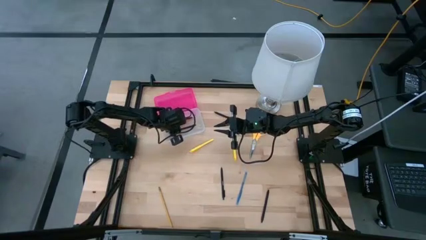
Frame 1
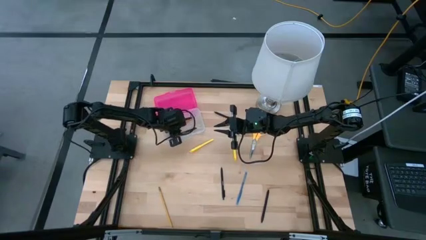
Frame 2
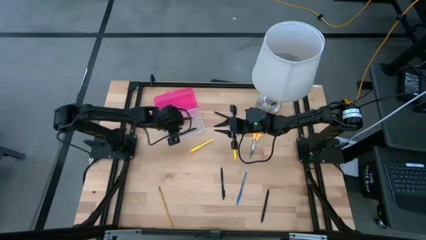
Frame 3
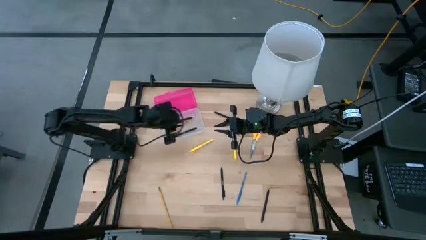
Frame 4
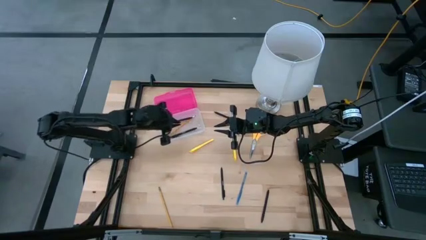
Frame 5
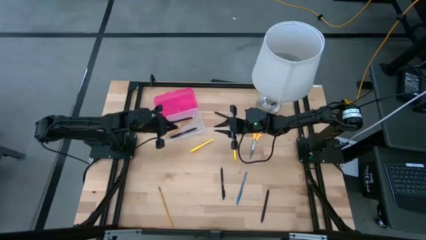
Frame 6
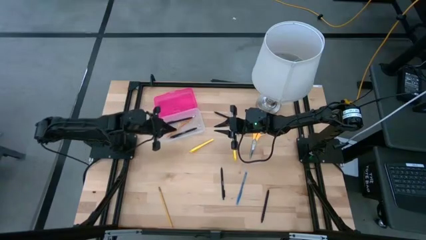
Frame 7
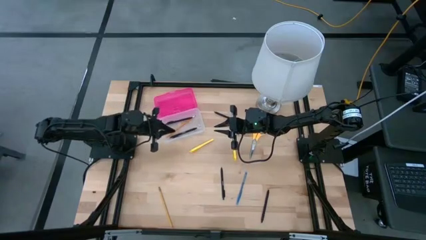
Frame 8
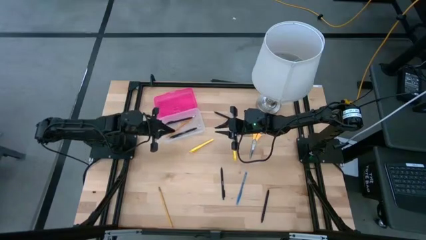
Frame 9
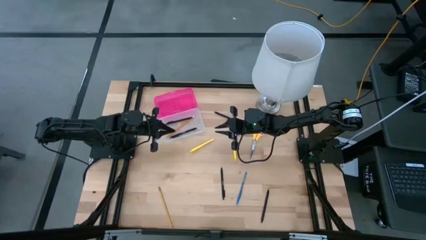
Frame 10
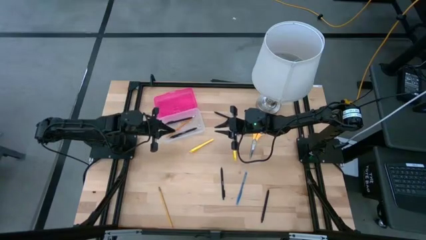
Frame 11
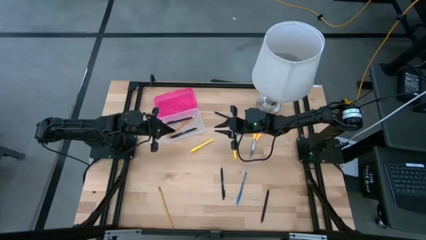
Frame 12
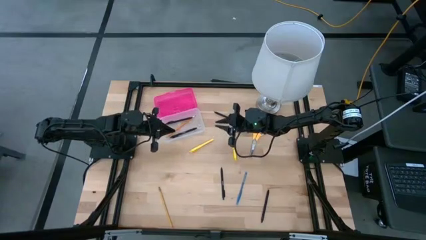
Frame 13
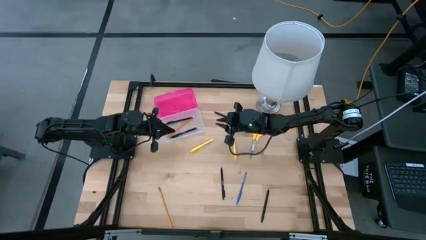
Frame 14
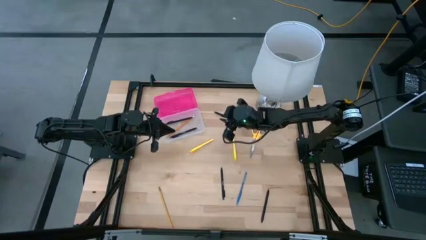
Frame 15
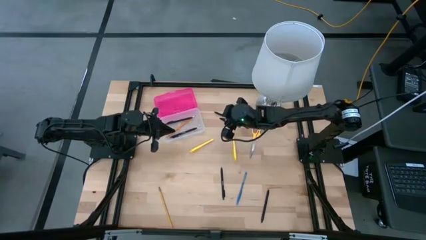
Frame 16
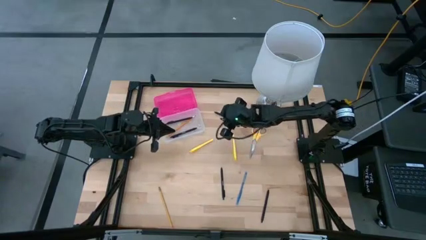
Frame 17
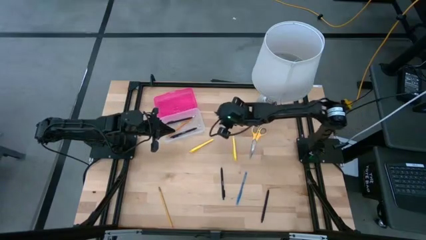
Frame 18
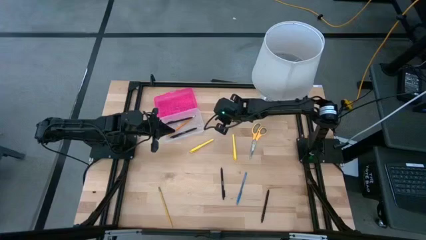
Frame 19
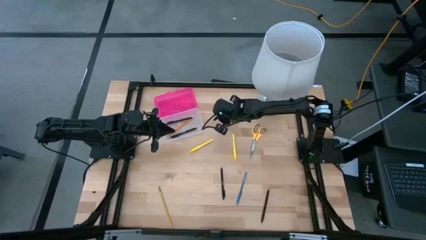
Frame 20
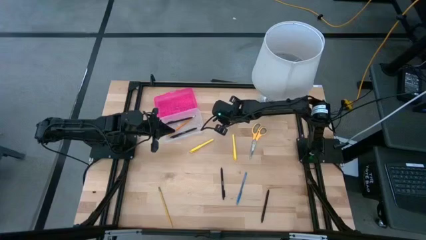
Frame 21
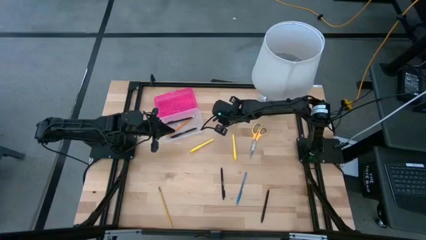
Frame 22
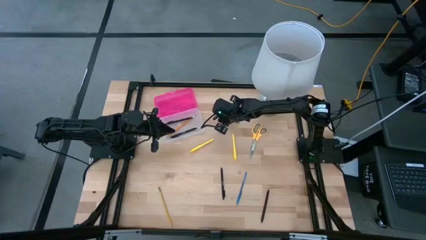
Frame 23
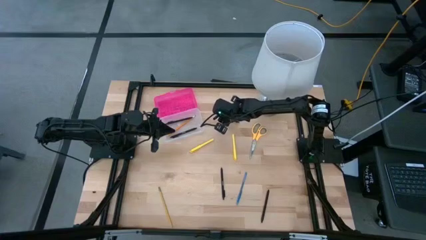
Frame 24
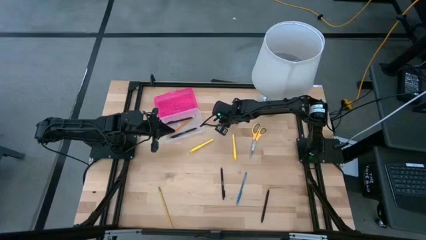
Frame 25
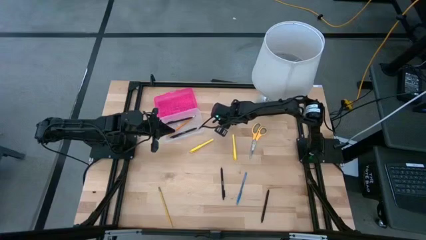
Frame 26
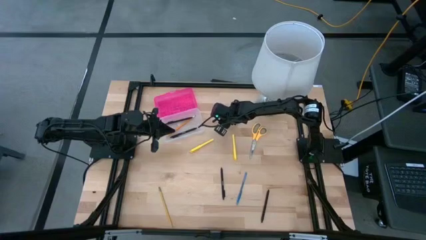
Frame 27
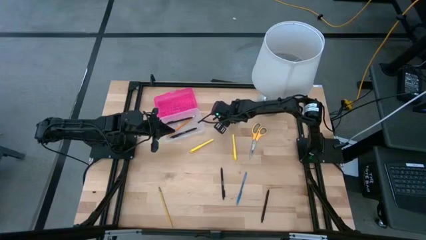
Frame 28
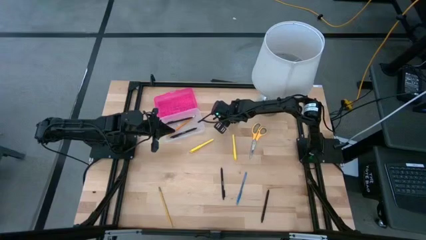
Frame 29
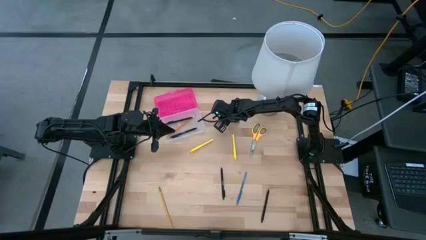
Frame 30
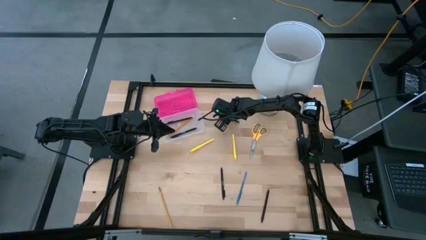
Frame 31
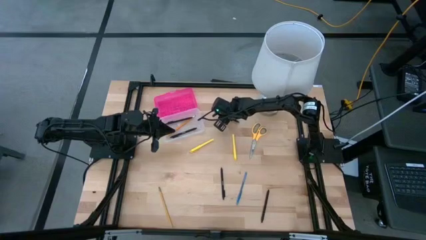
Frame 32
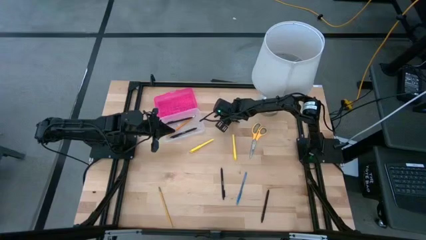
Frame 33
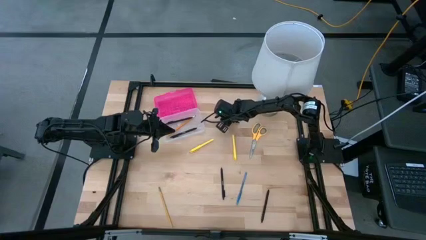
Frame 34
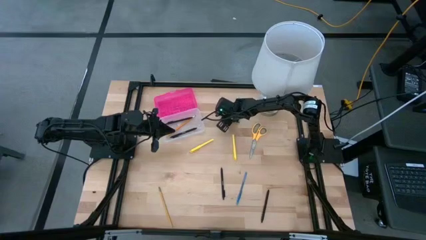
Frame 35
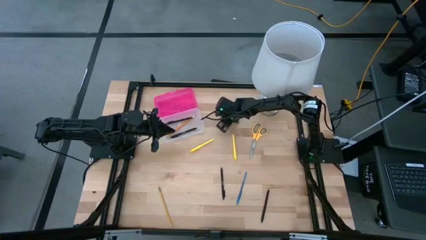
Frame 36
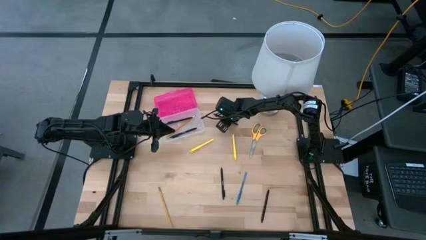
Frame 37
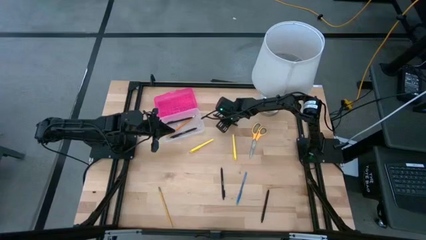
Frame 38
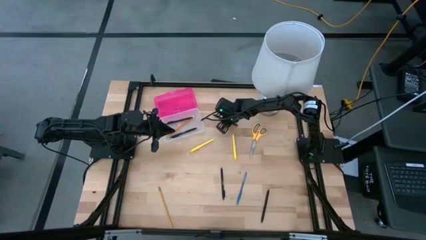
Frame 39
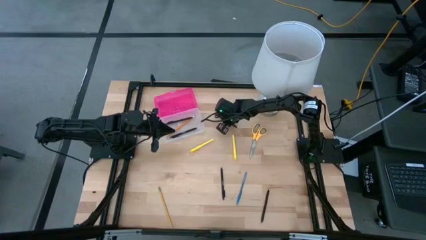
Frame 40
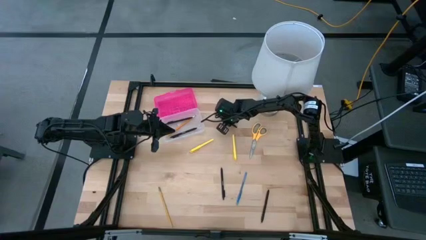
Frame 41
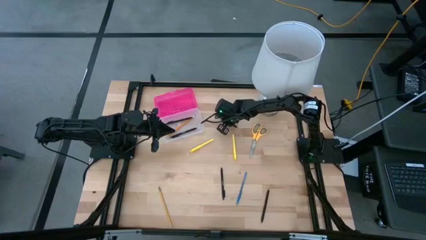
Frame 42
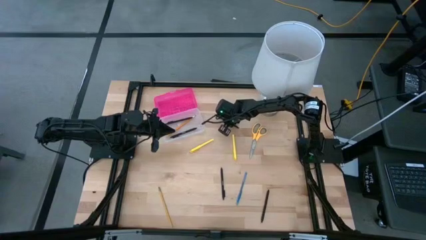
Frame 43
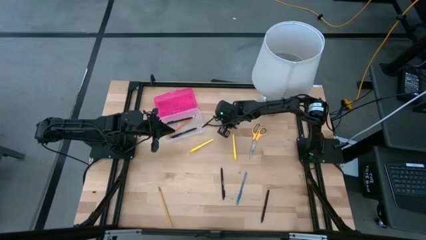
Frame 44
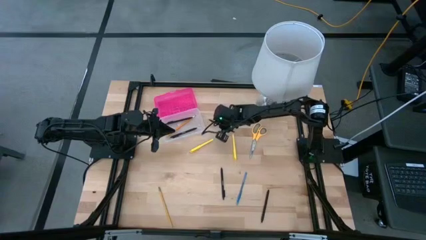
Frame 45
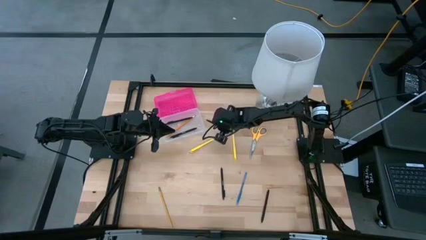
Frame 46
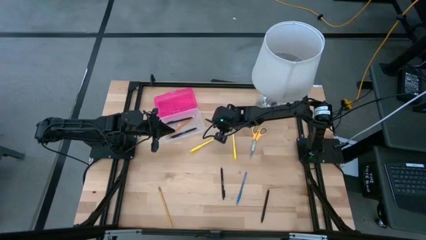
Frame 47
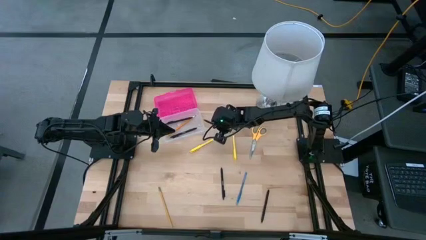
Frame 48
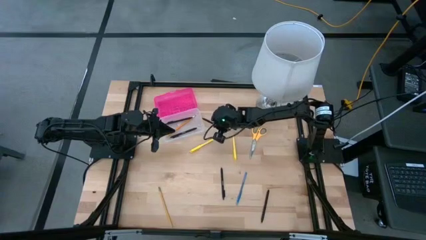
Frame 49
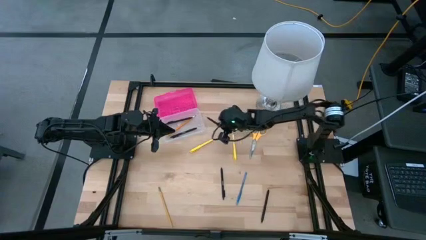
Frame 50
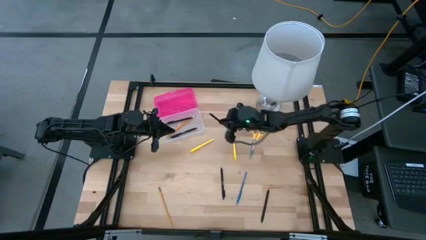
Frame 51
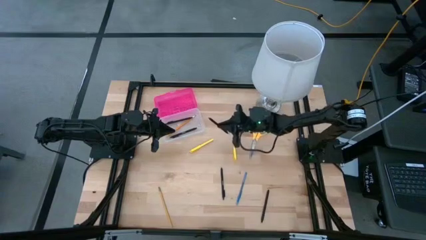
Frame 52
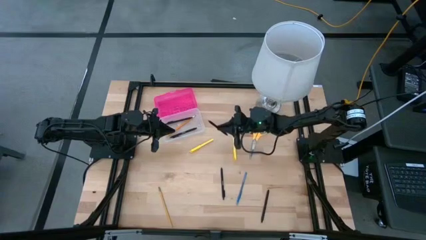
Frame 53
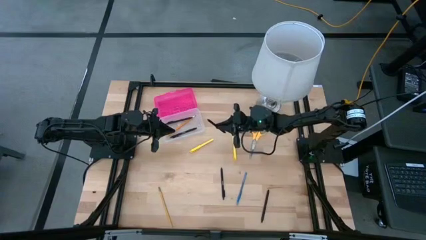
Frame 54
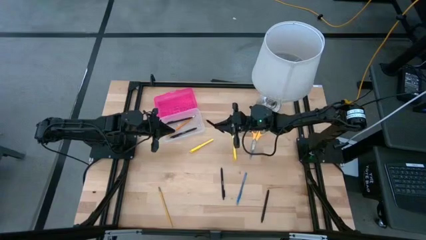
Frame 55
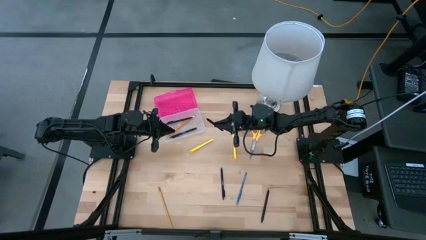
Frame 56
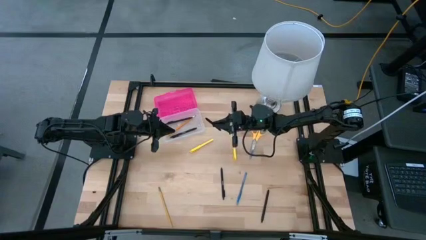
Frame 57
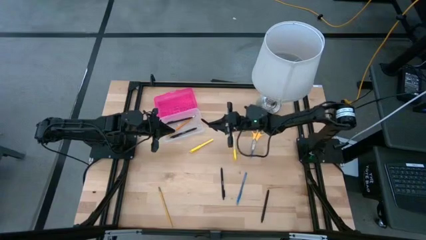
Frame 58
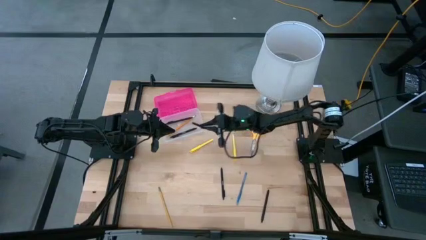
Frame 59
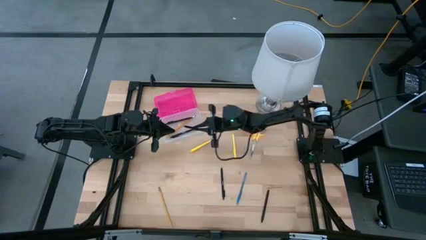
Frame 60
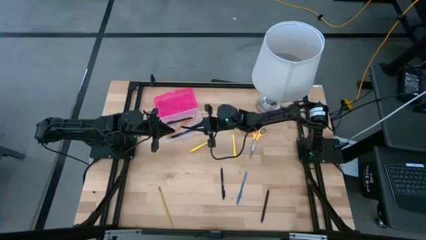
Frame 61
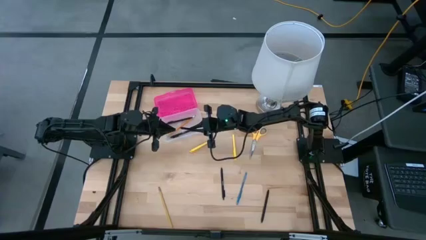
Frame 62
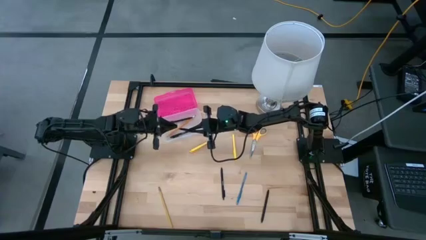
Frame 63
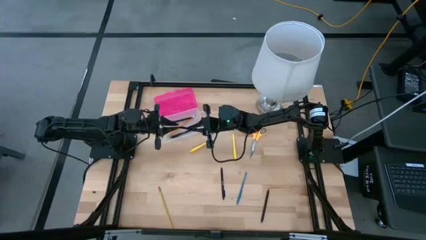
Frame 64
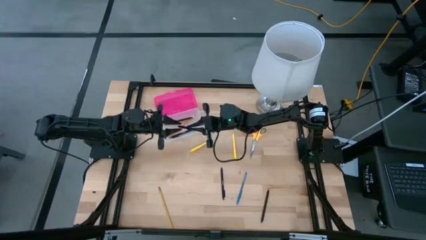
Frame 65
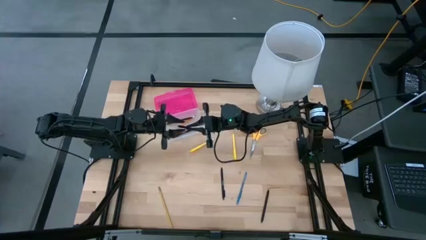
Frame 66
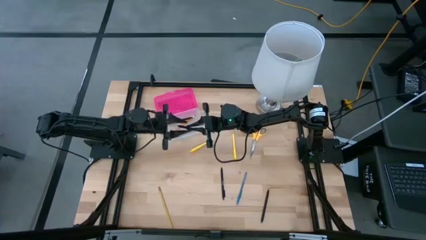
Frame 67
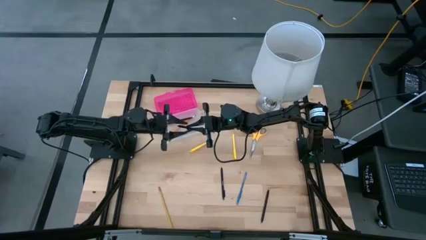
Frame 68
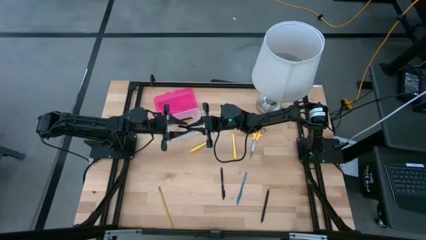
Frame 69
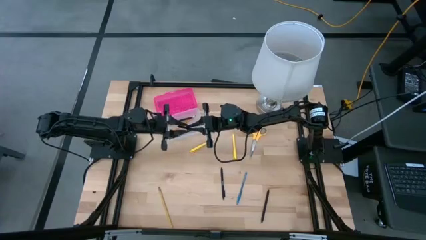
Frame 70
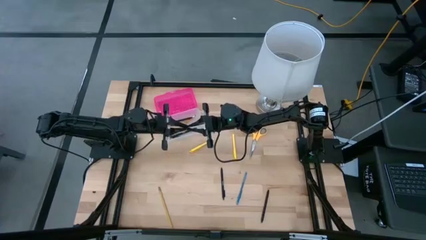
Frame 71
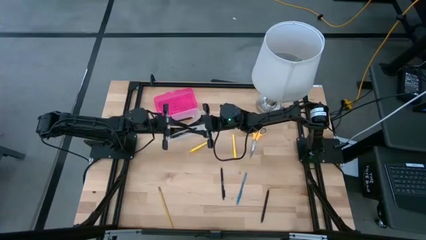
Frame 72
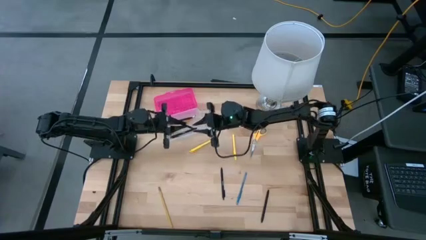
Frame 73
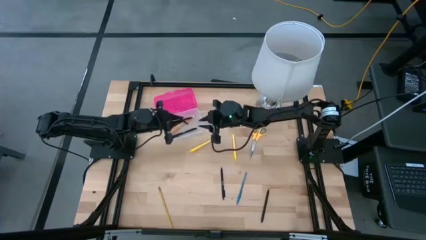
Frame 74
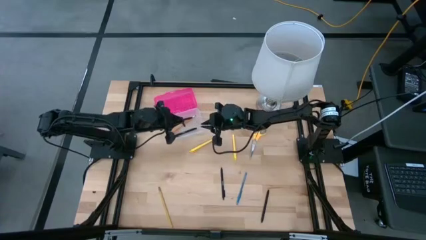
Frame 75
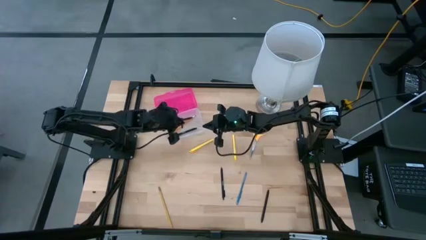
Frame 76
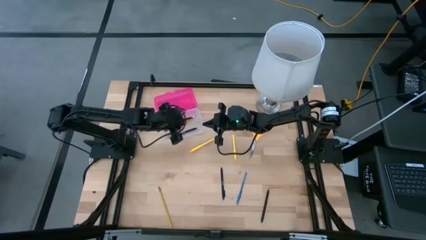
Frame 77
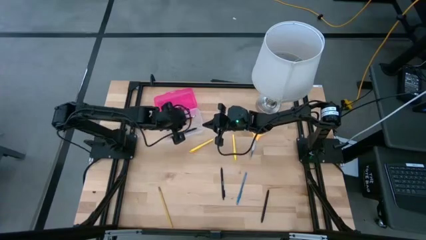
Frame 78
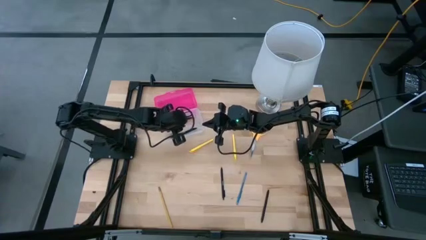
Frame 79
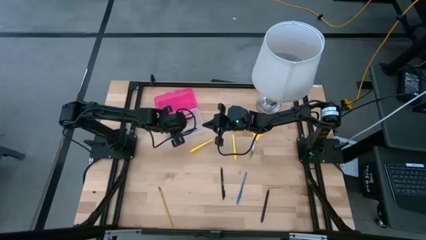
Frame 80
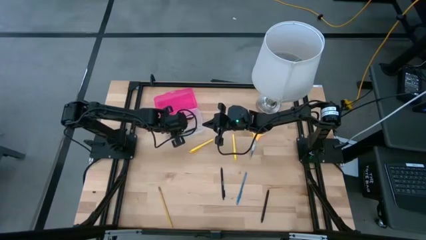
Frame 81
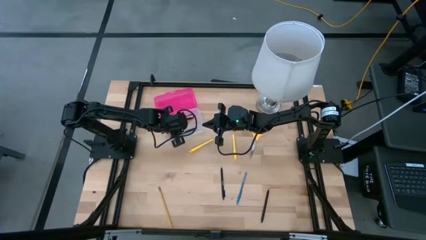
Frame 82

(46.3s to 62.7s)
Task: Pick & place school supplies into a supply box
Put the black pen into the pink supply box
